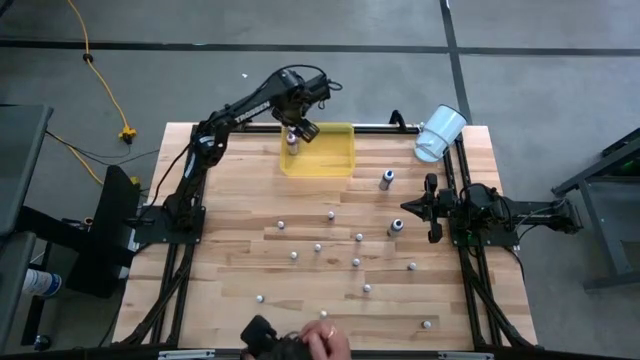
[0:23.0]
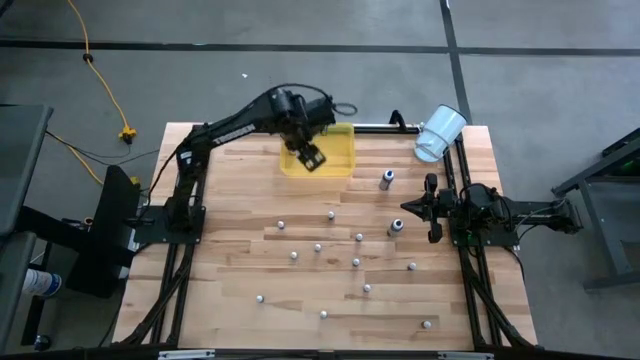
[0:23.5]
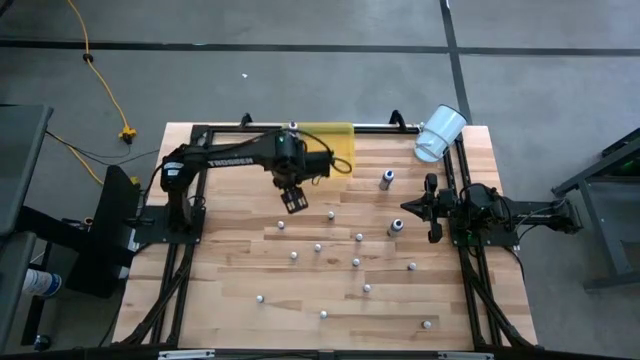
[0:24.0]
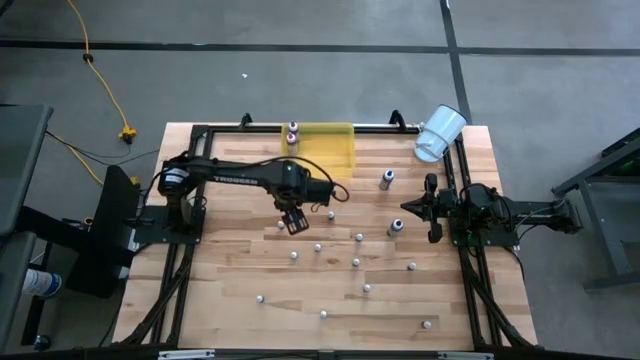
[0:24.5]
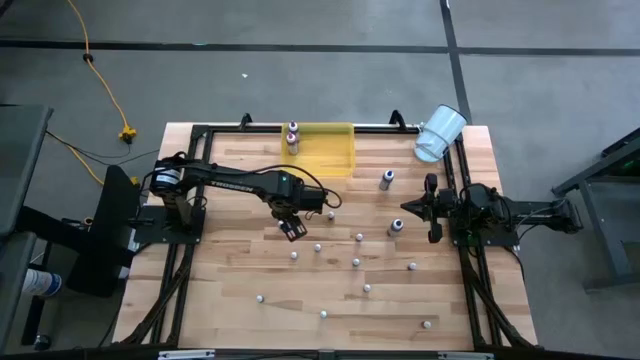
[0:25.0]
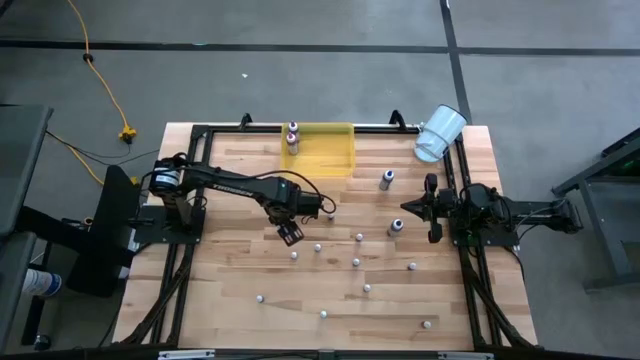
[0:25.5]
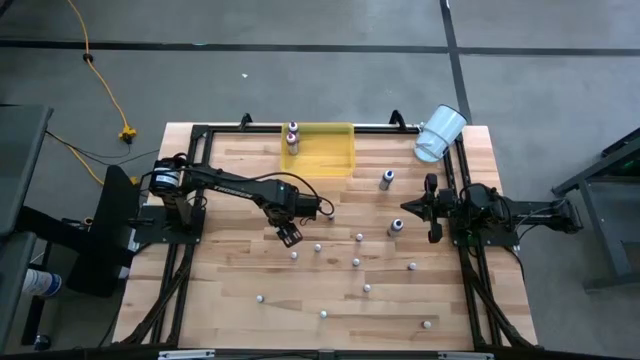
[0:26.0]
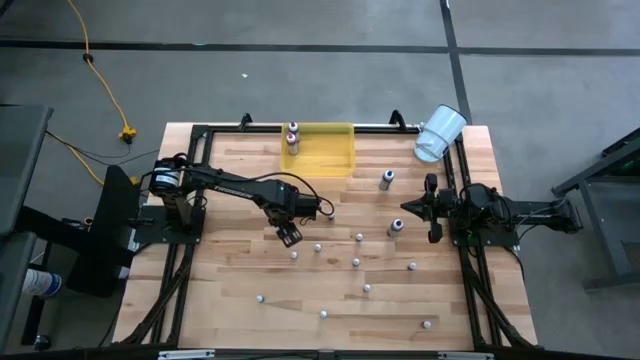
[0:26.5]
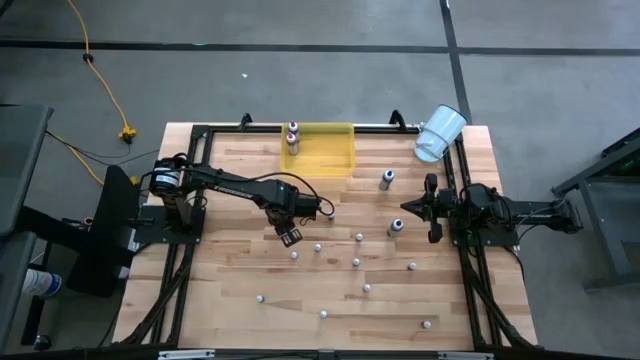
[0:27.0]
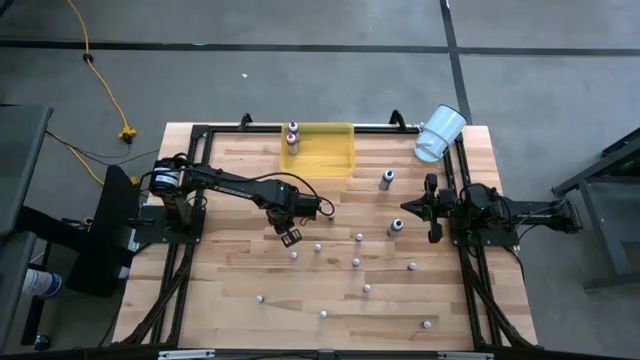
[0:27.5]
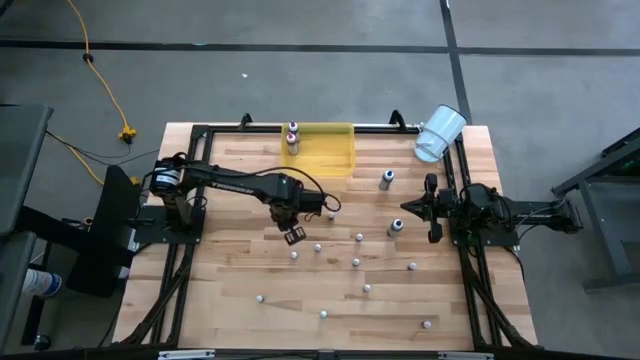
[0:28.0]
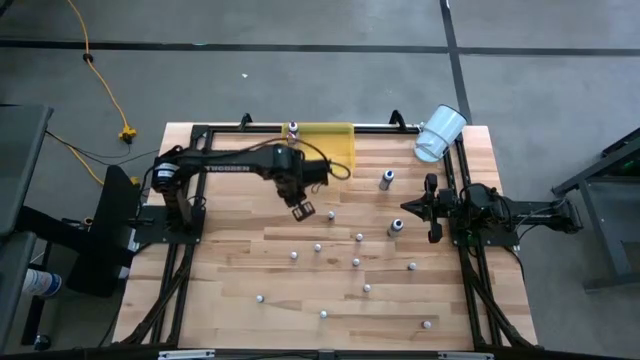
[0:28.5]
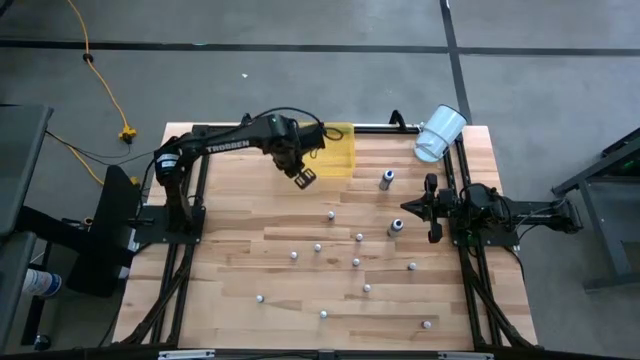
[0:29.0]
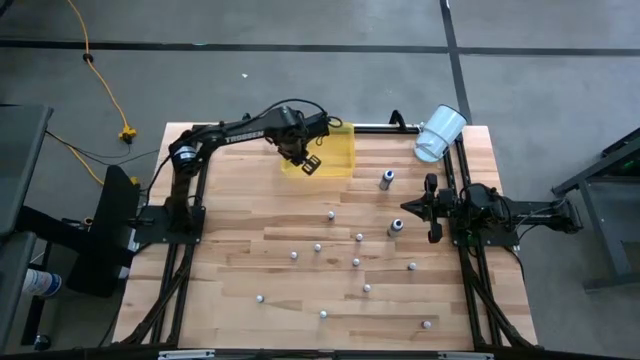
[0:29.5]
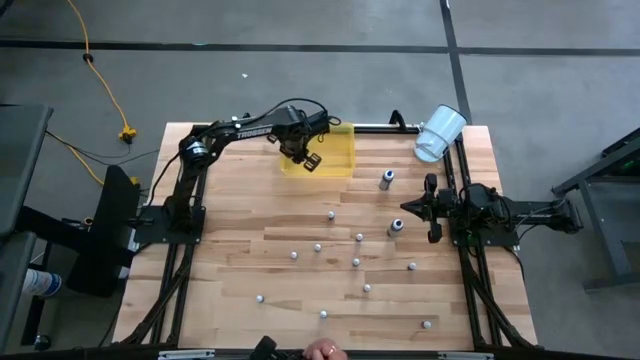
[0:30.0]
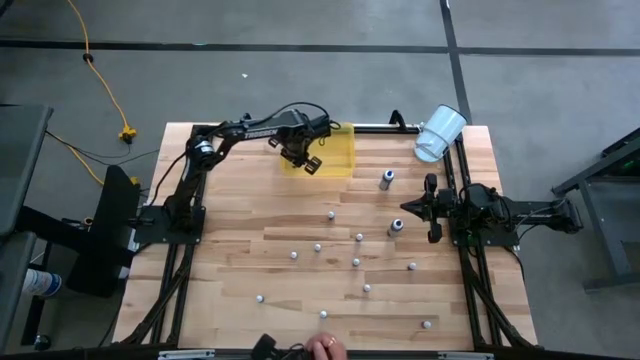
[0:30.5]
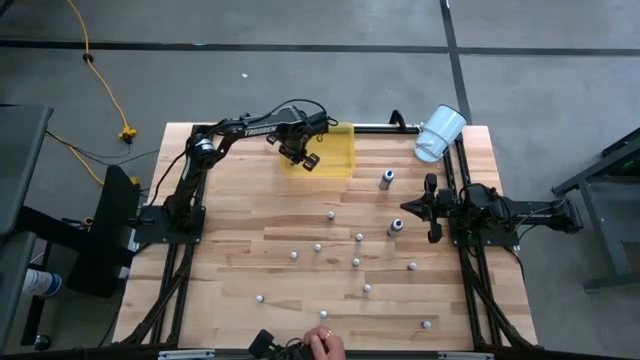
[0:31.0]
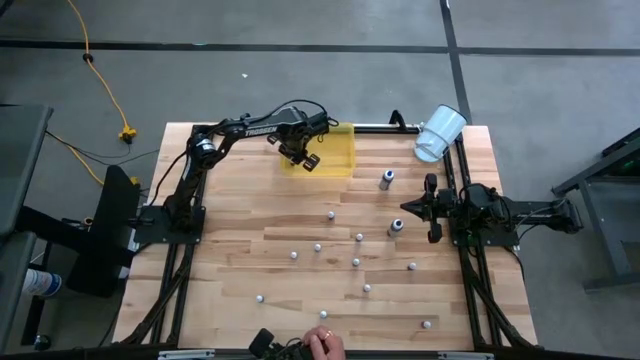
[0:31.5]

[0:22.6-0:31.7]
Task: Pick & Place food coloring
Put the left small black food coloring bottle into the yellow container

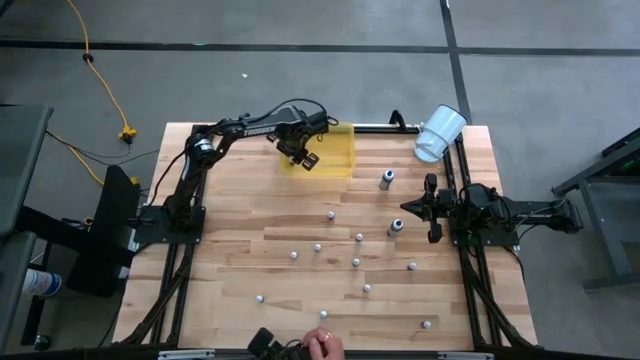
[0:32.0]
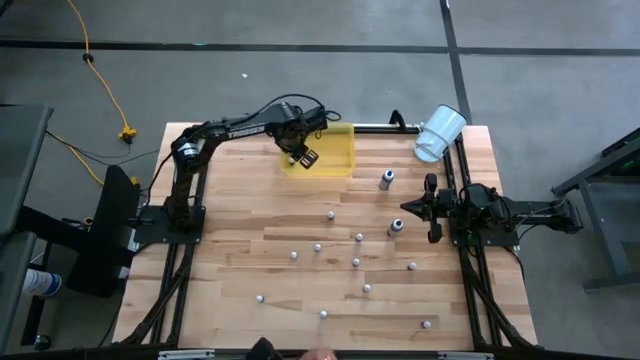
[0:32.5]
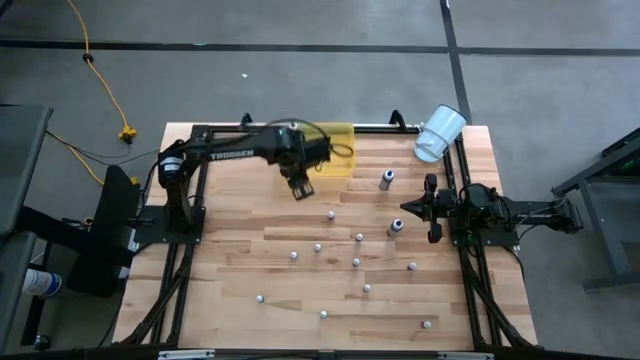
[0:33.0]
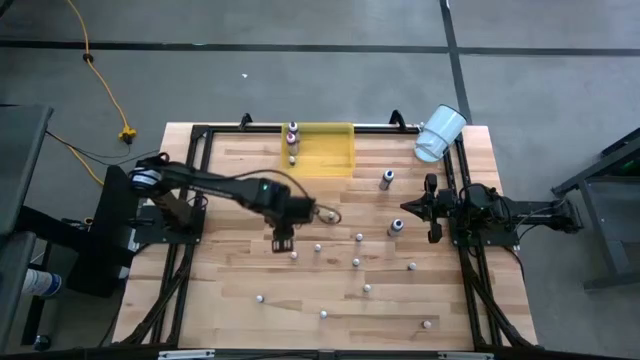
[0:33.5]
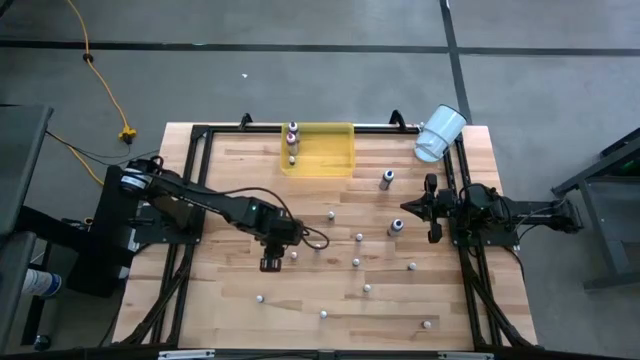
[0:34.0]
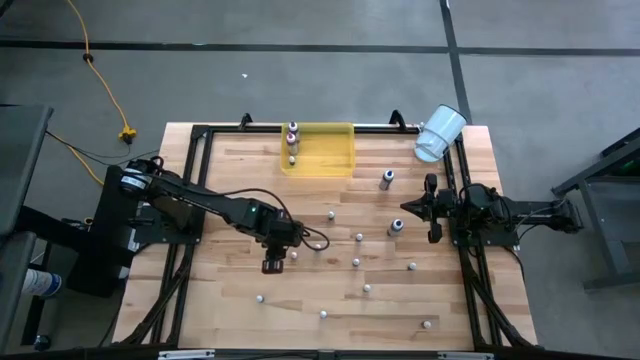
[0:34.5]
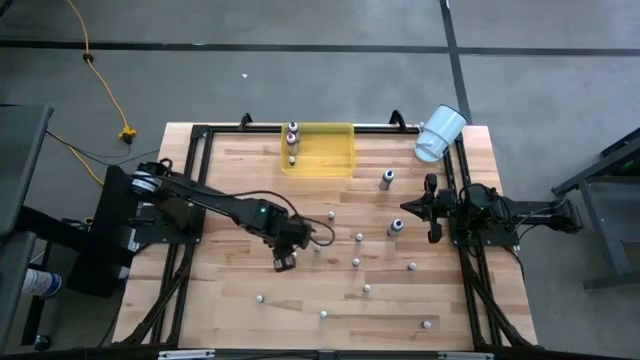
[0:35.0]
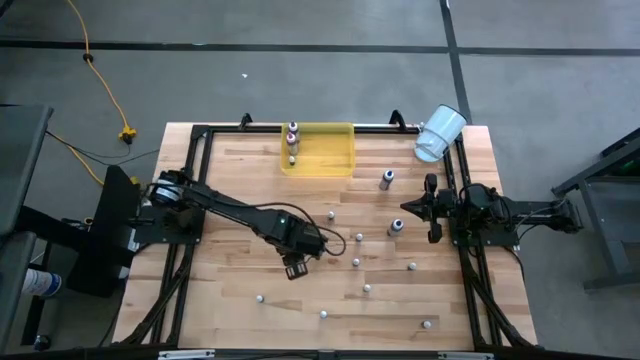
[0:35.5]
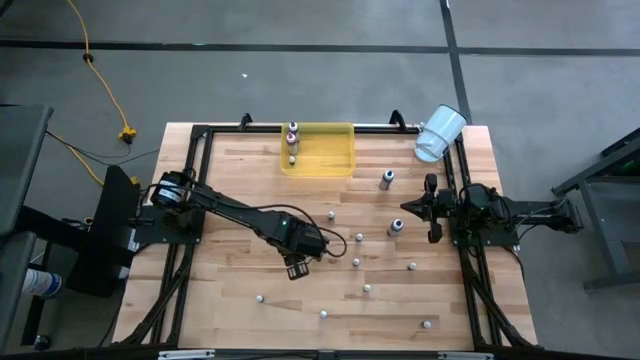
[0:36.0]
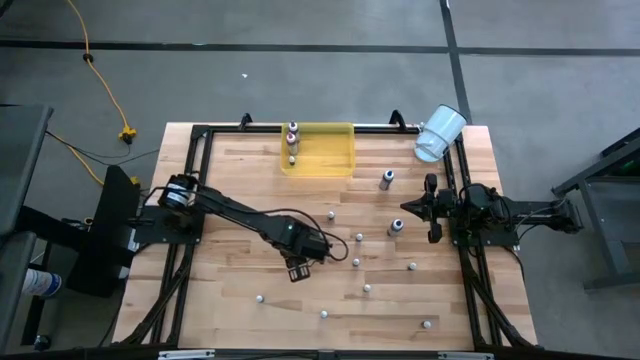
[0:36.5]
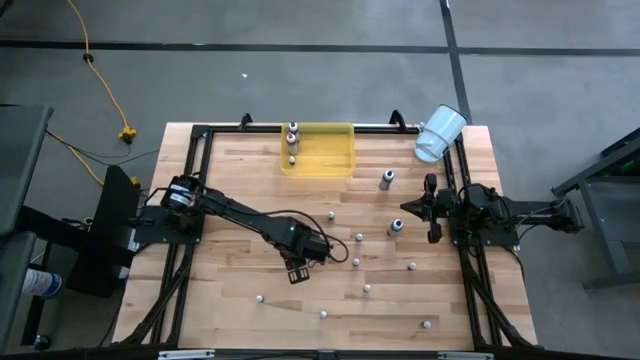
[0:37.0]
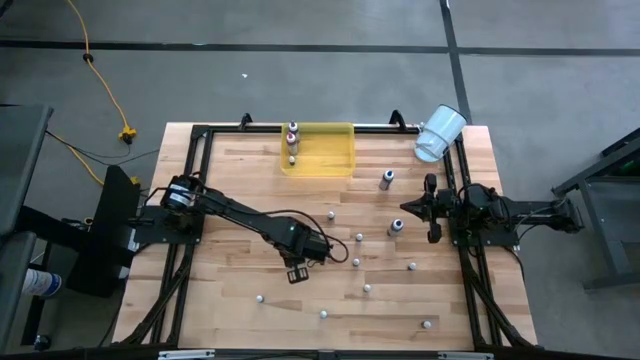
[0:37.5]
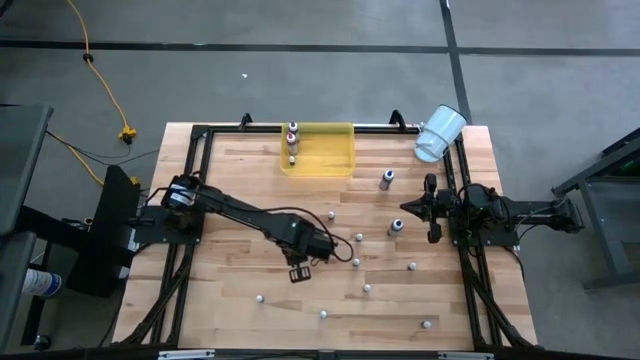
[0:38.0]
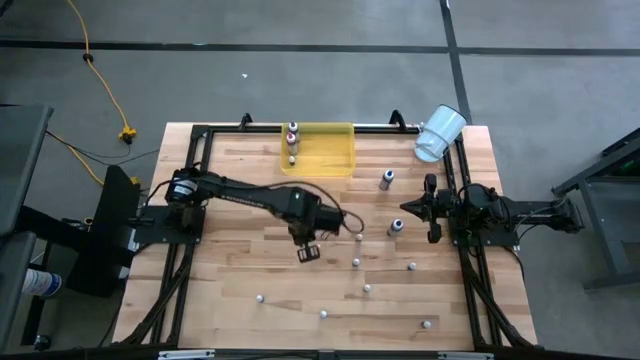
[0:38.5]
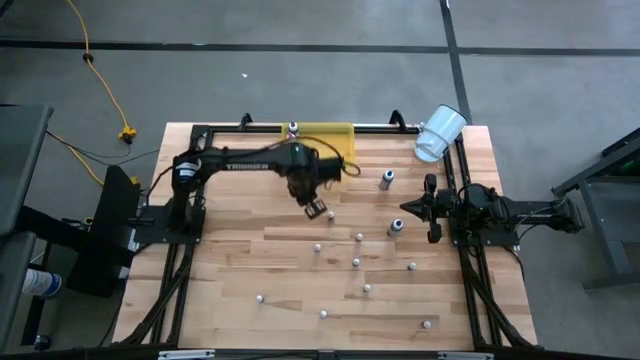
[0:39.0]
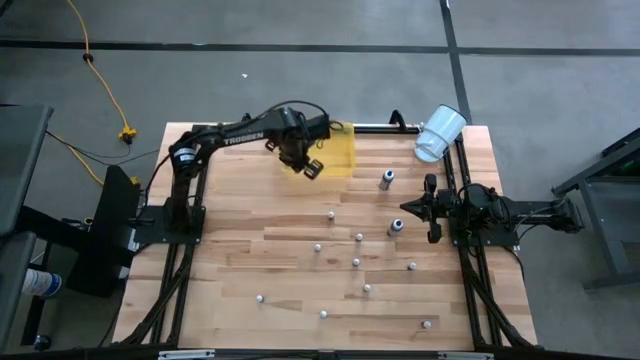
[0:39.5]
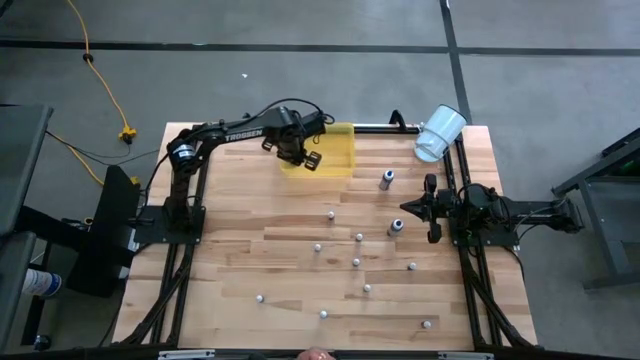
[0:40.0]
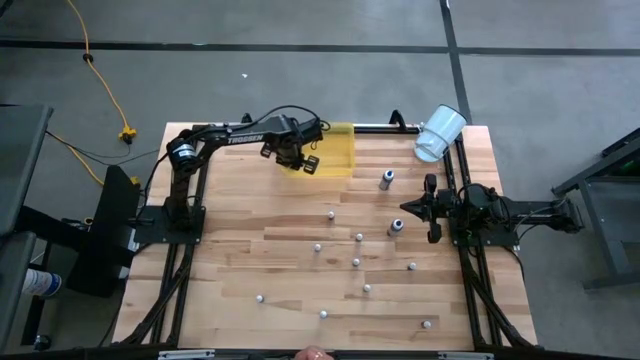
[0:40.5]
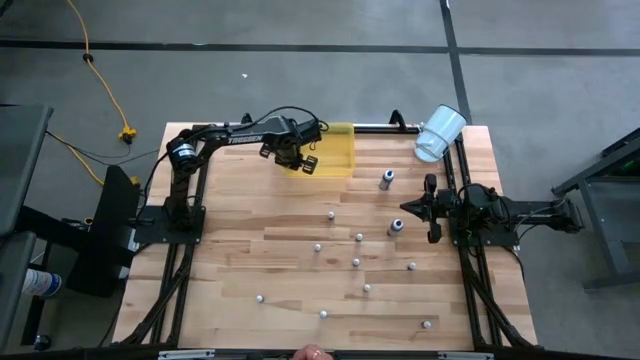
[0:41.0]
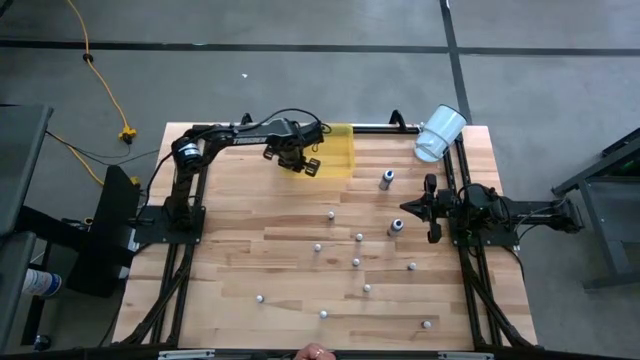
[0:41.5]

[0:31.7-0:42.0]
Put the top small red food coloring bottle into the yellow container

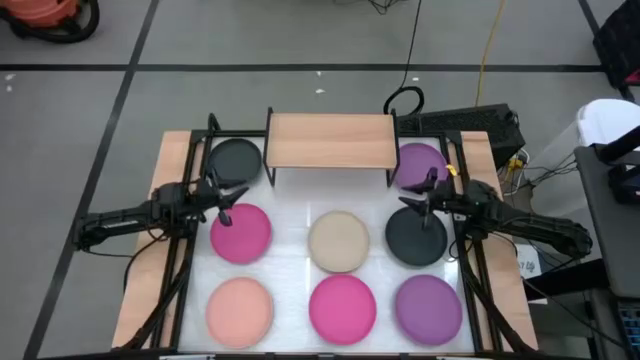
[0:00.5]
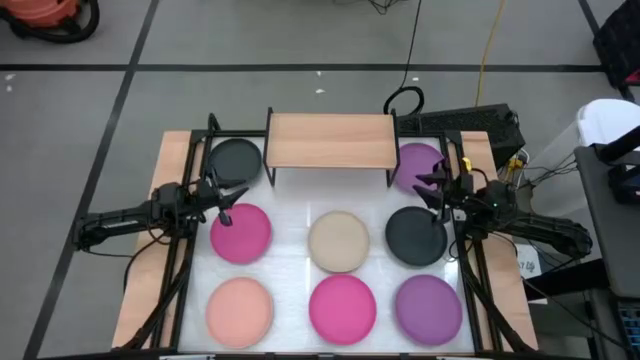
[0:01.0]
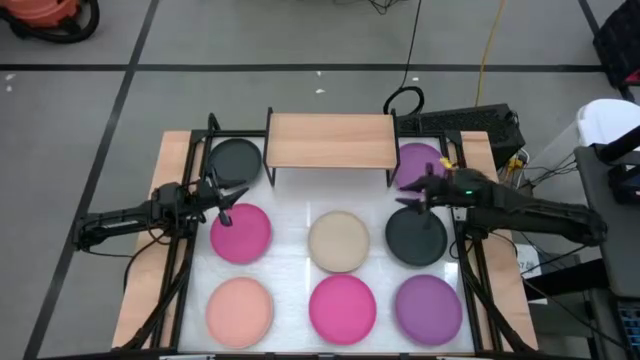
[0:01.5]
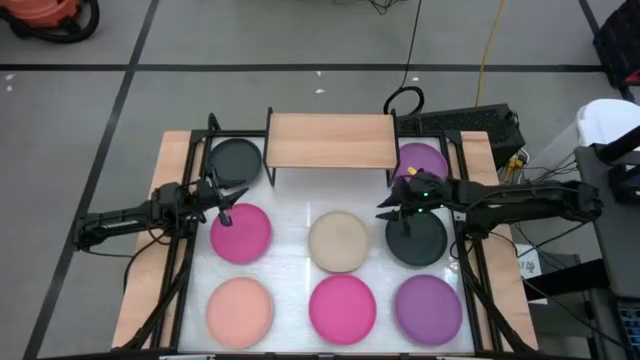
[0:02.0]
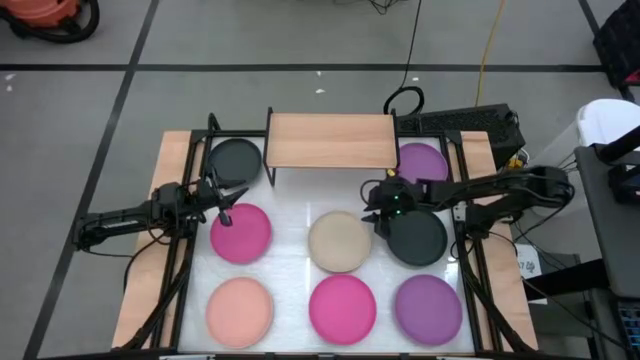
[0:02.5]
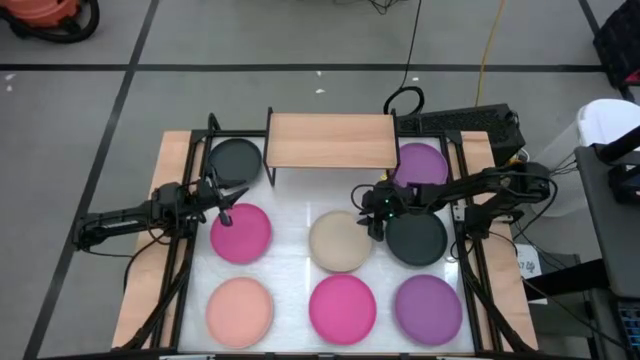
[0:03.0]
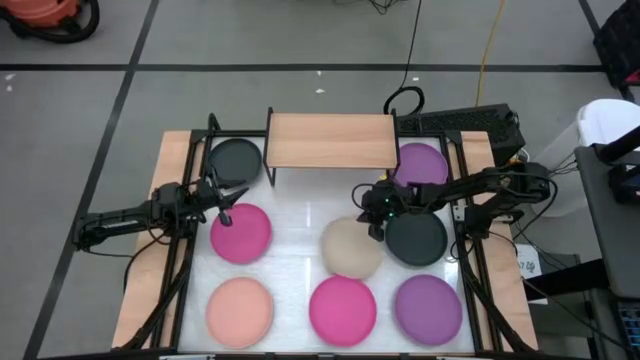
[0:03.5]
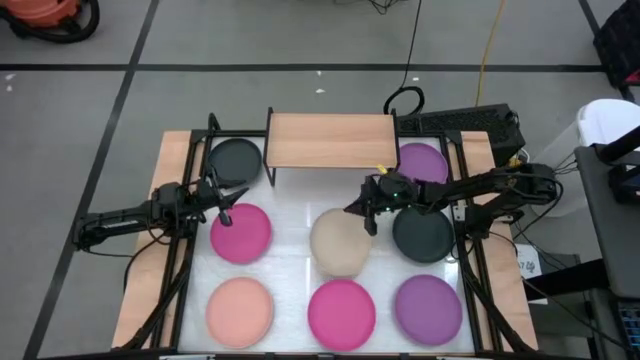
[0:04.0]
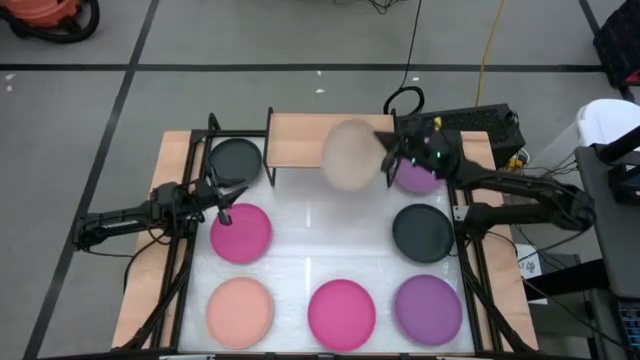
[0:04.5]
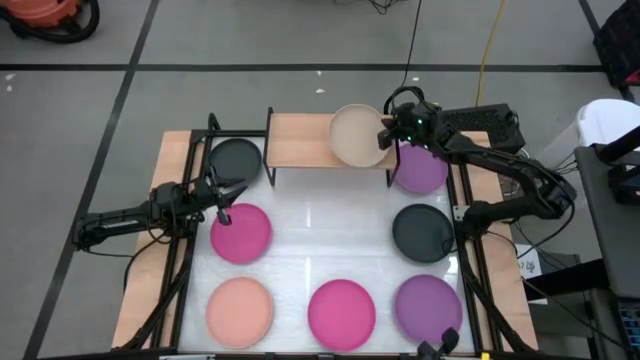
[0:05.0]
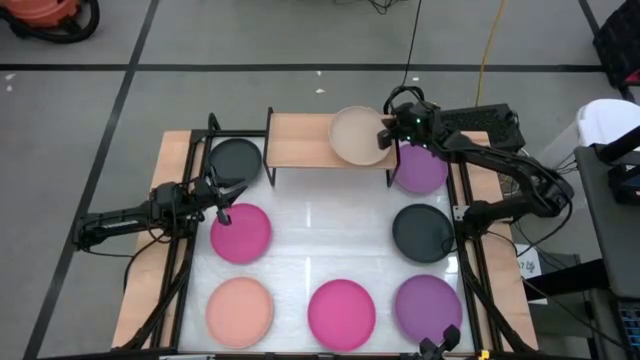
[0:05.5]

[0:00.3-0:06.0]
Task: Place and stack plates onto a shelf
Put the gray plate to the right on the shelf
